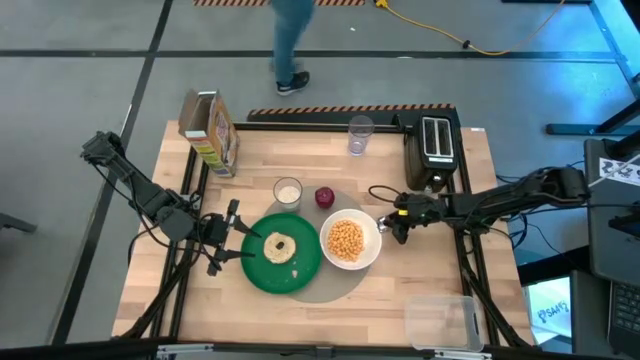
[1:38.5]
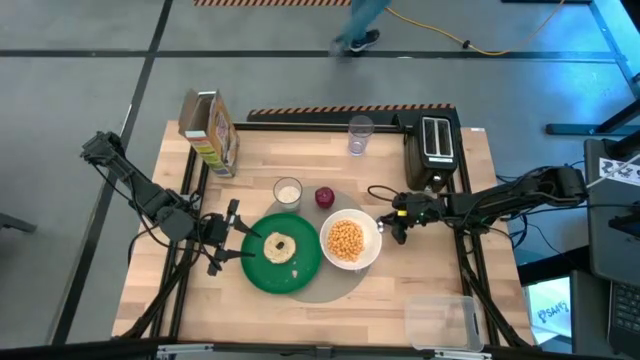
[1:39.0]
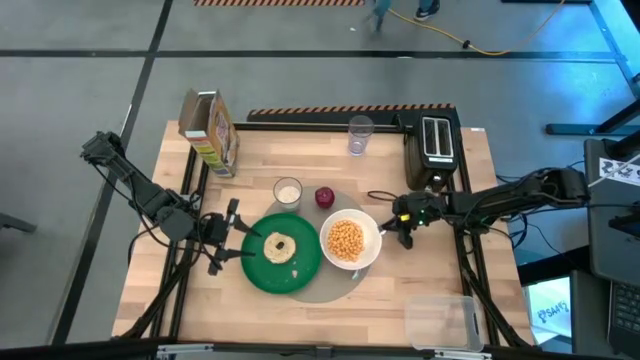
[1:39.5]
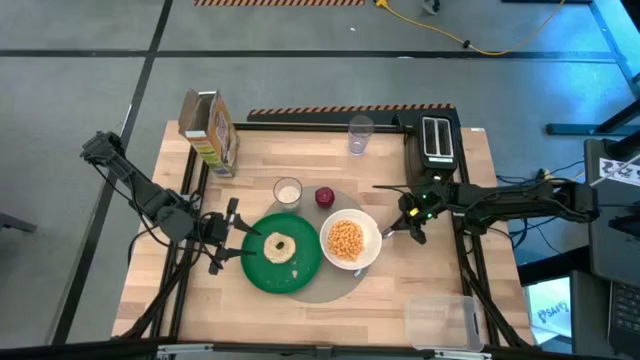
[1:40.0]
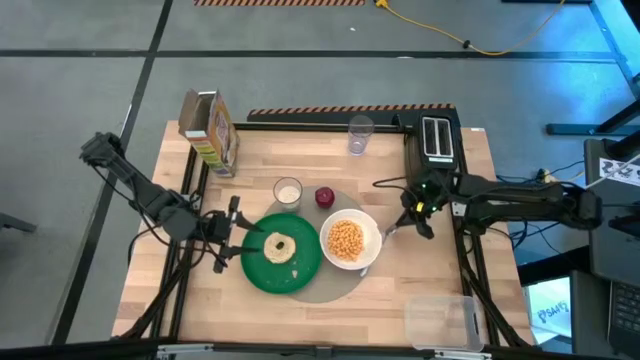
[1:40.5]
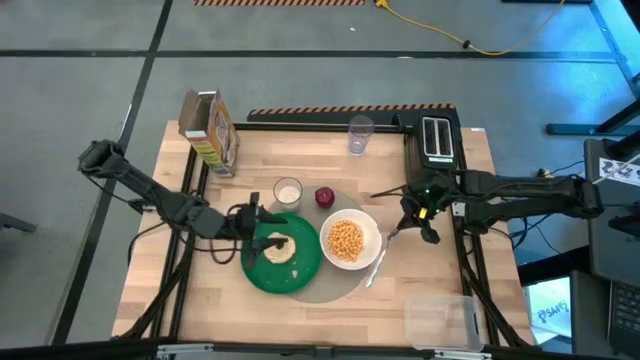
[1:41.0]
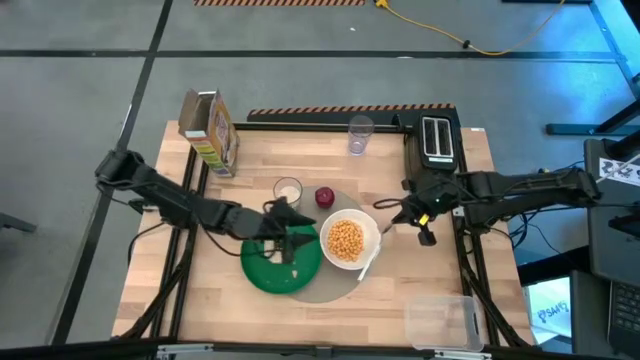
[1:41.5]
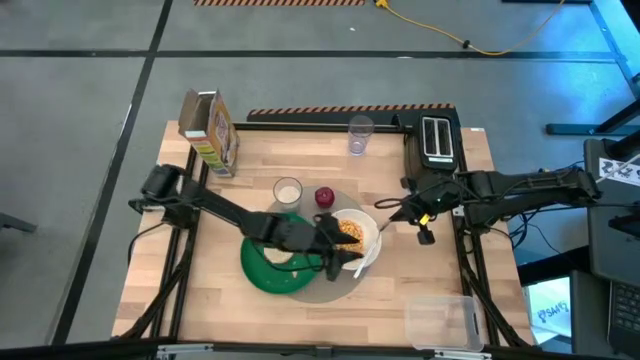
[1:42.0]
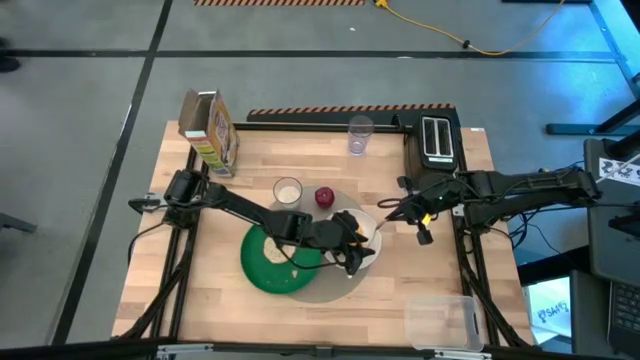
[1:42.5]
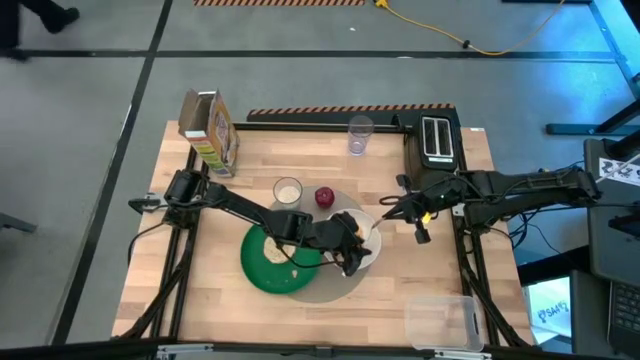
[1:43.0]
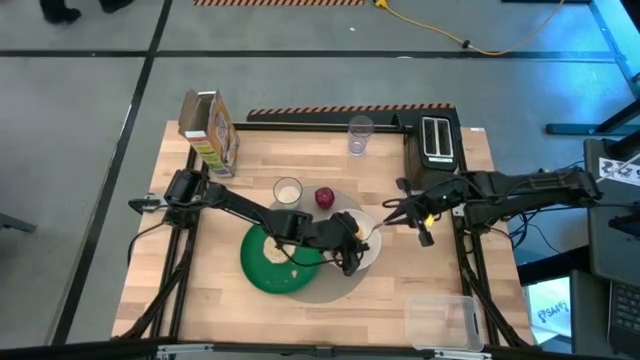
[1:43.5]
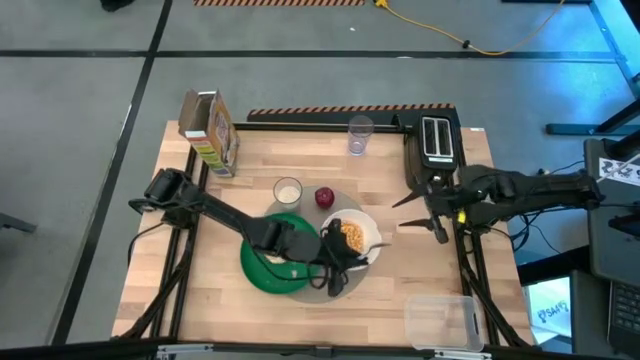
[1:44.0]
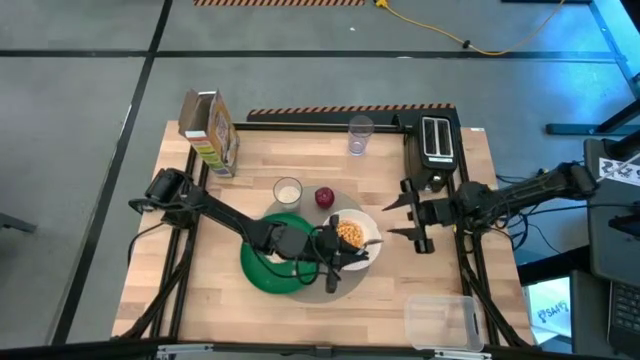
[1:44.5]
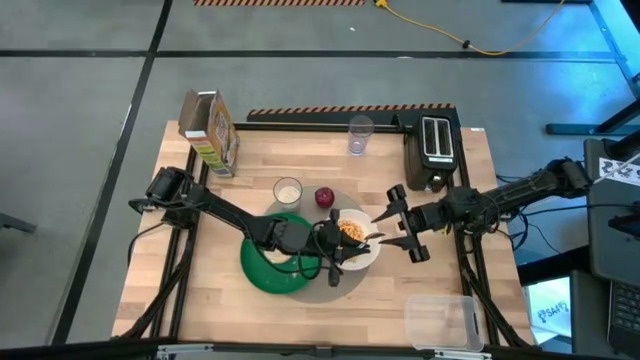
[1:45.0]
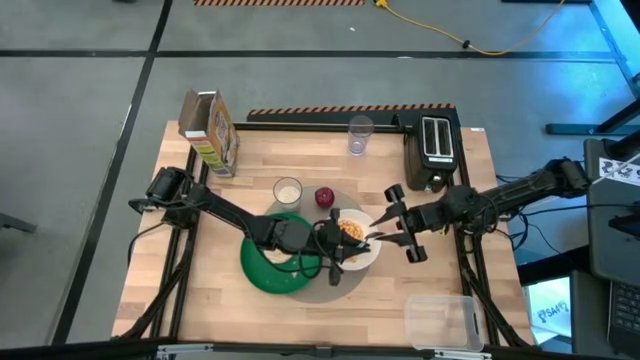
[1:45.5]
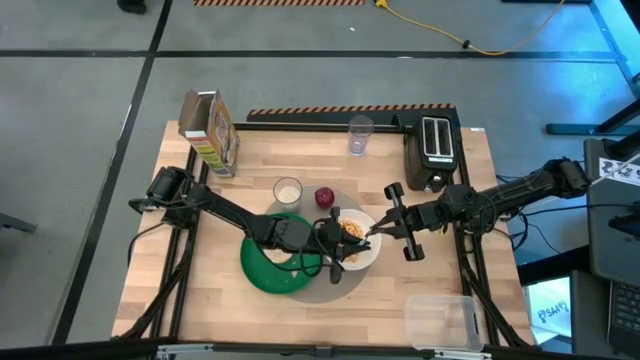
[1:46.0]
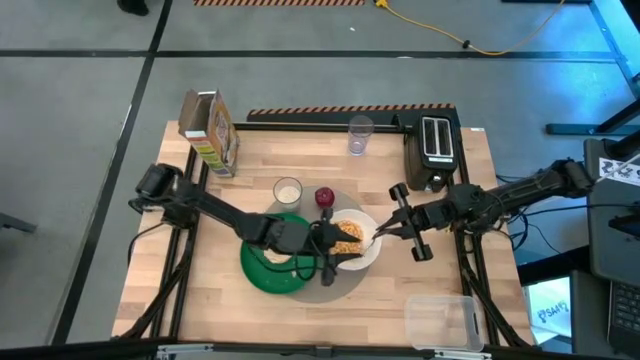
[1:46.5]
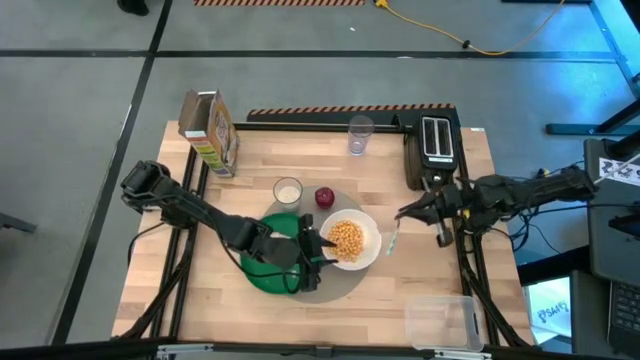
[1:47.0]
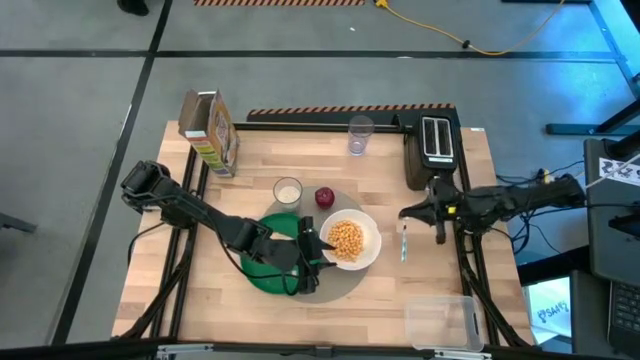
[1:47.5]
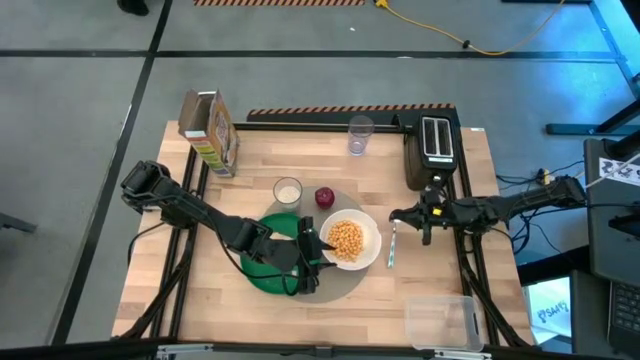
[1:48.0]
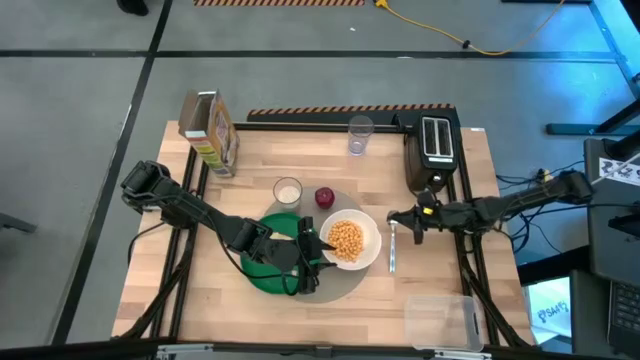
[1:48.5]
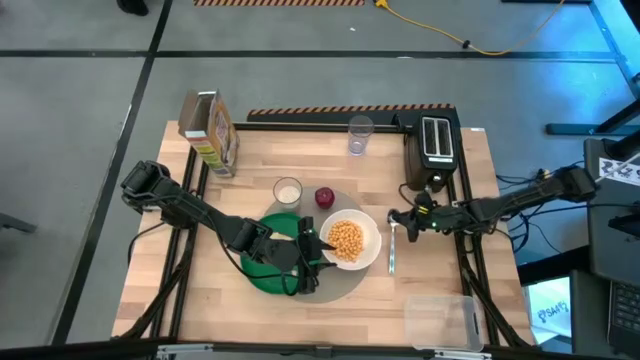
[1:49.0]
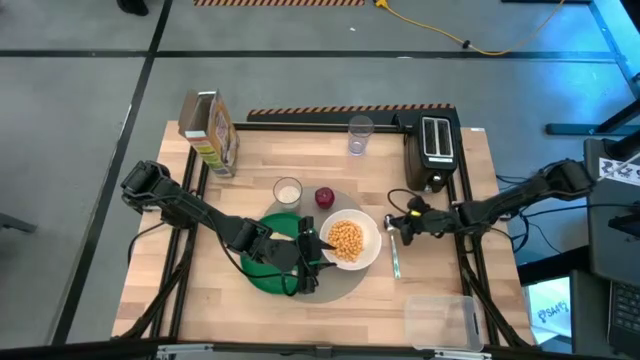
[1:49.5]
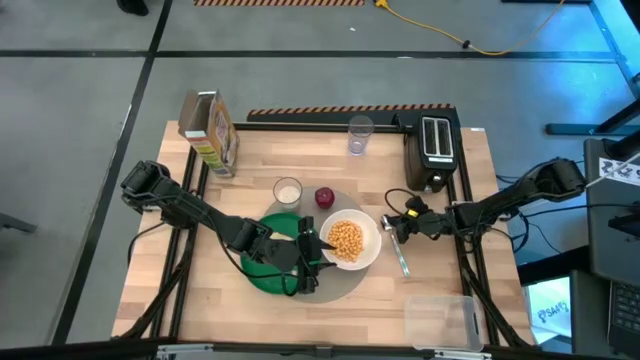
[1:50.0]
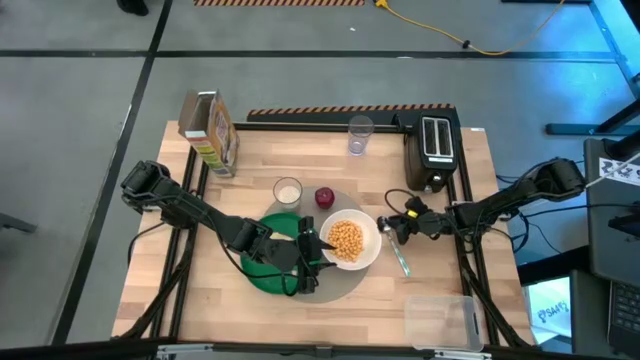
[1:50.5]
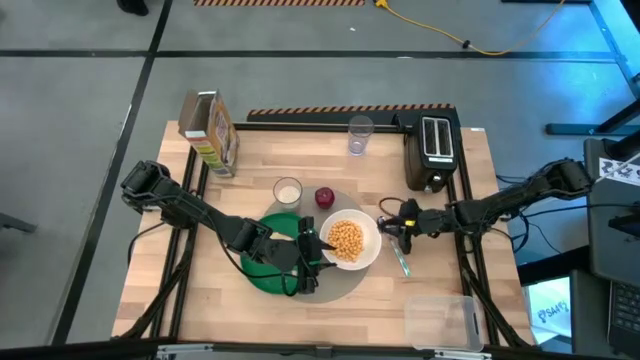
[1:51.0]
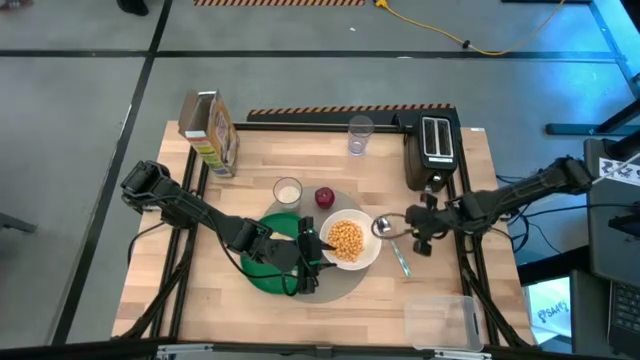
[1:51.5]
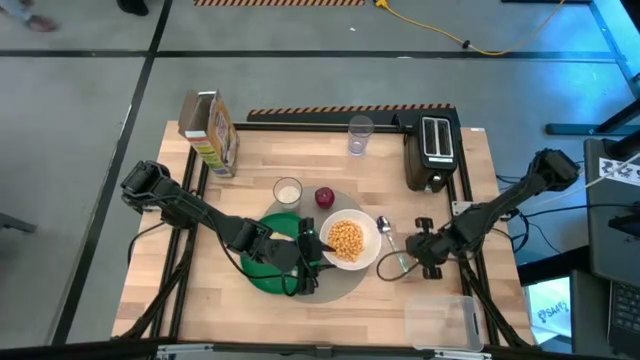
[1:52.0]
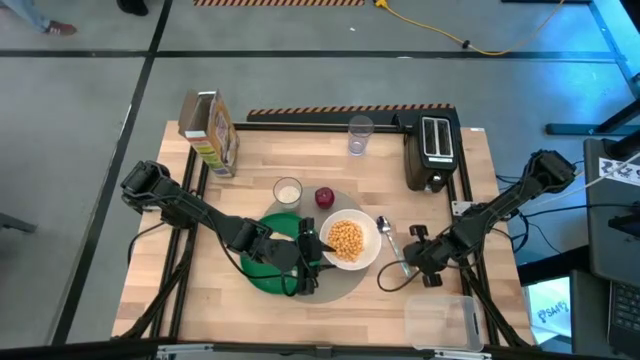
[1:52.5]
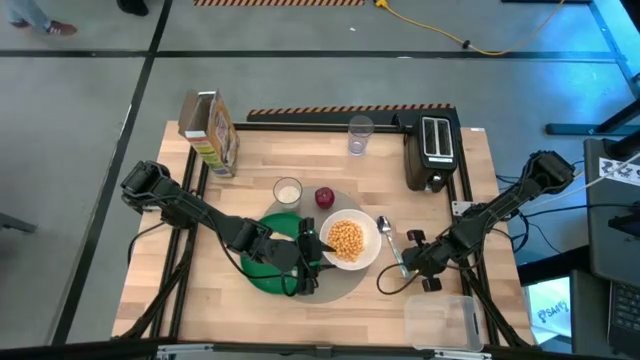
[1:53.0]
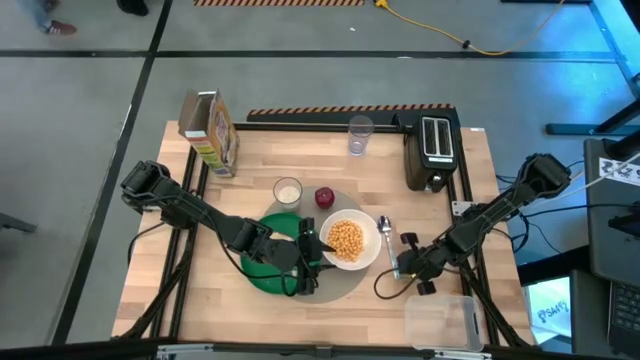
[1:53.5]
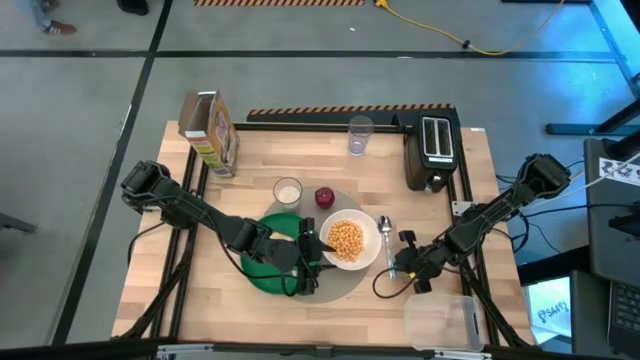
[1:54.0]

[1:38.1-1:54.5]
Task: Arrange a breakfast setting
Put the blue patterned spoon to the right of the white bowl

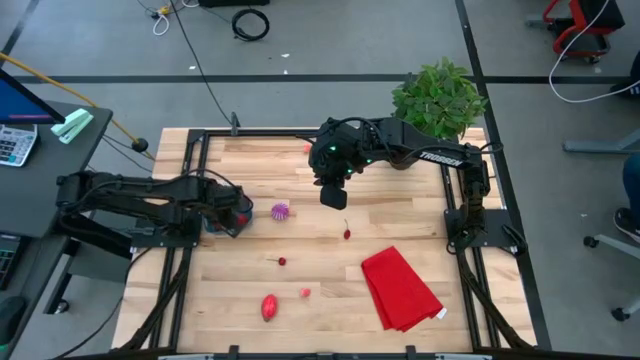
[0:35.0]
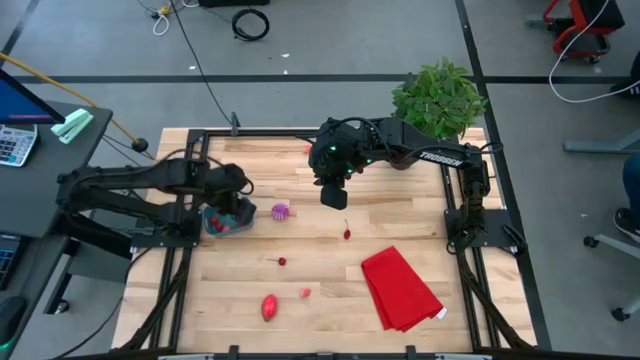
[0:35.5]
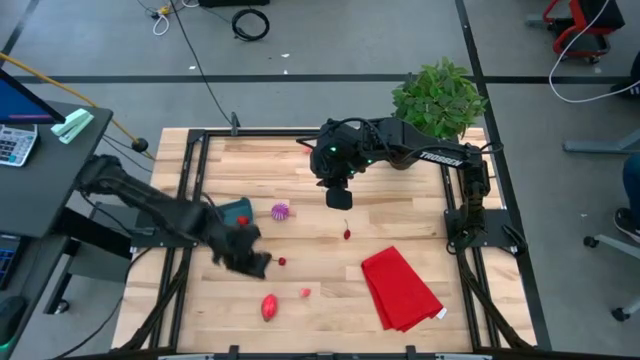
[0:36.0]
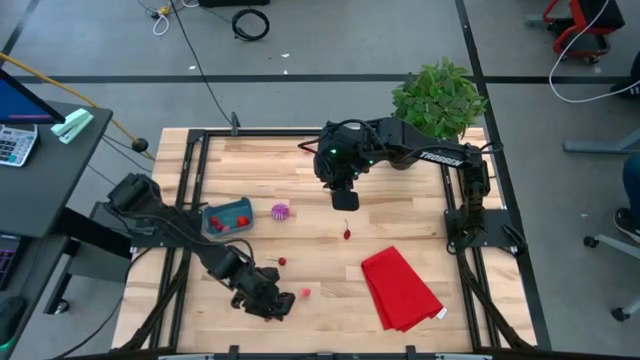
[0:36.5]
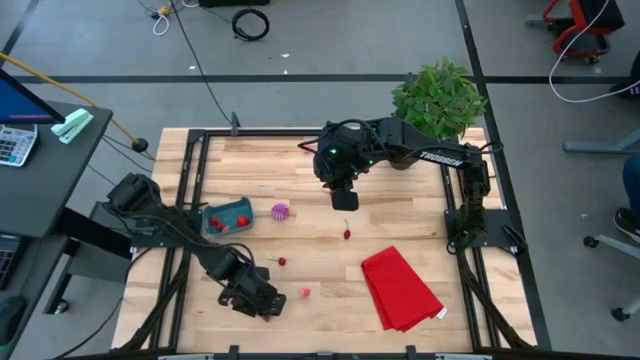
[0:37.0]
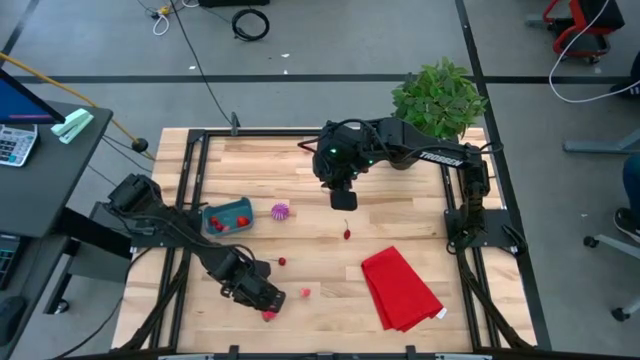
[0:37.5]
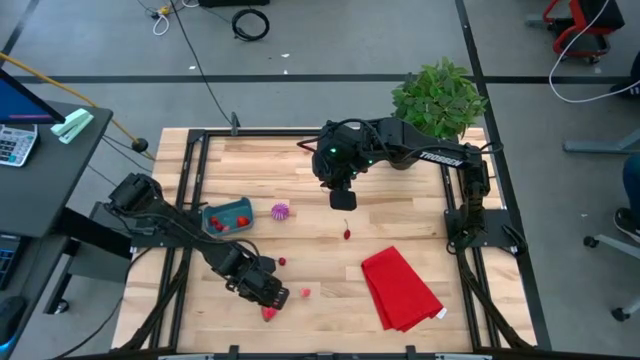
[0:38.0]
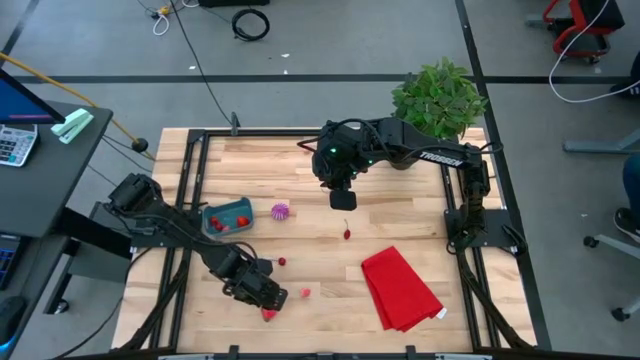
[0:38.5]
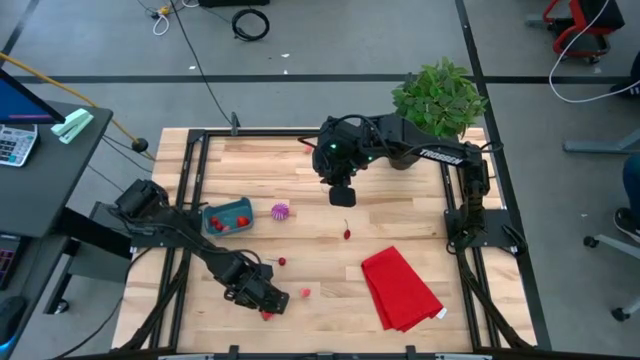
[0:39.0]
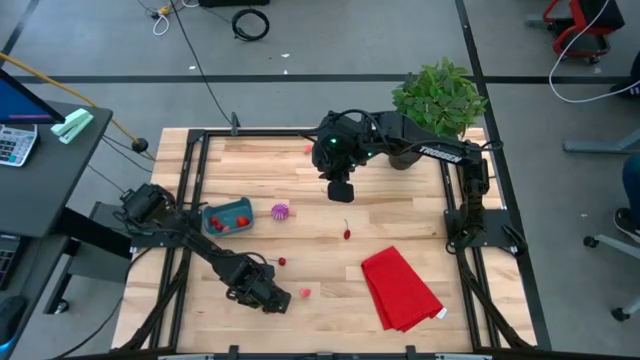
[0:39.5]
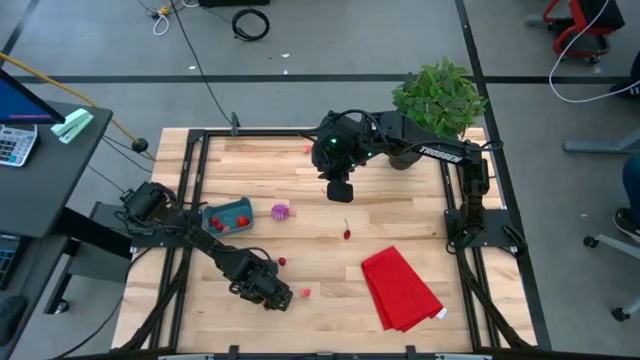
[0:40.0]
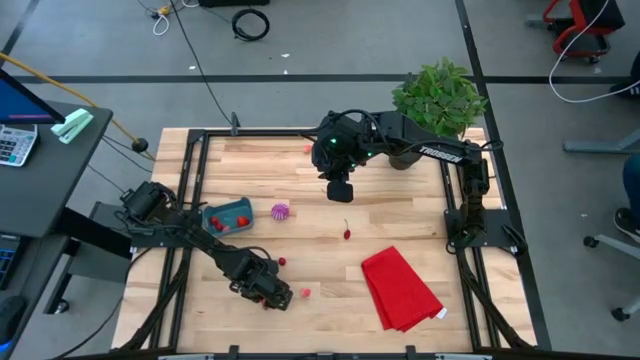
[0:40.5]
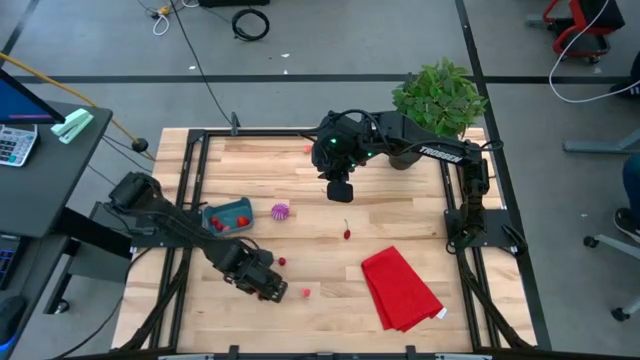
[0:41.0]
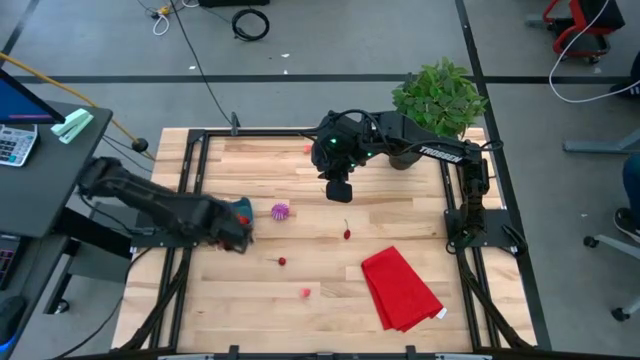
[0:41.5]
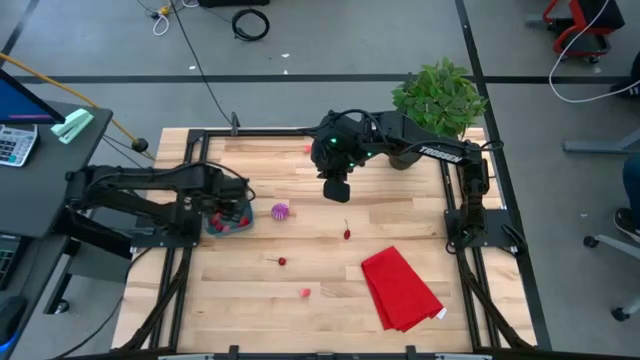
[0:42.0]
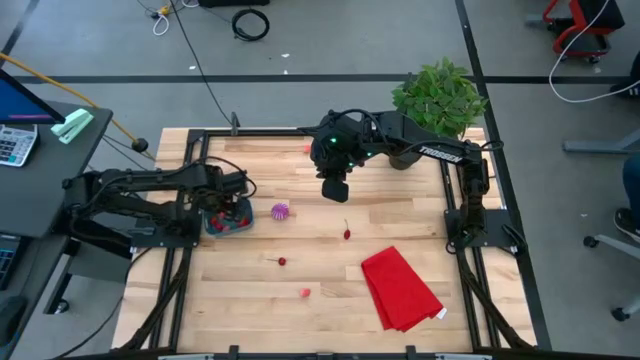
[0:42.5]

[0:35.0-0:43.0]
Task: Pick and placing Produce into tupperware
Put the red dragonfruit into the blue bin
